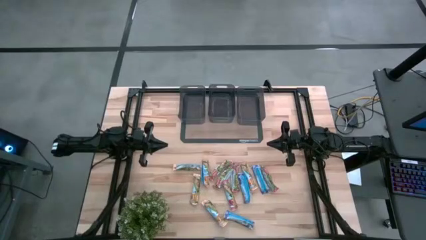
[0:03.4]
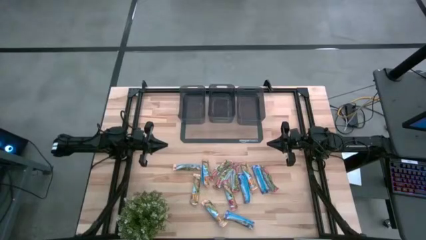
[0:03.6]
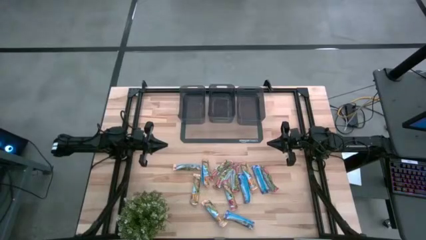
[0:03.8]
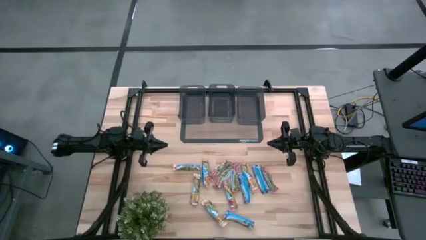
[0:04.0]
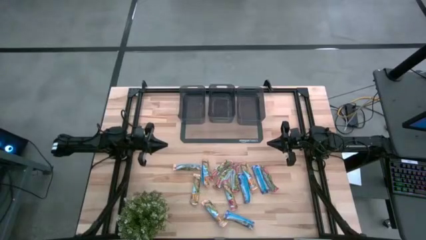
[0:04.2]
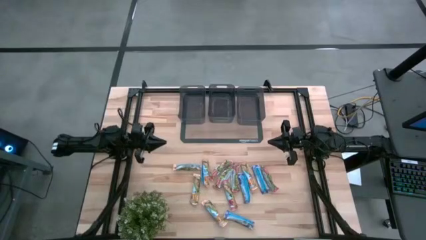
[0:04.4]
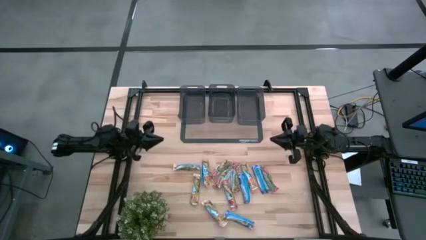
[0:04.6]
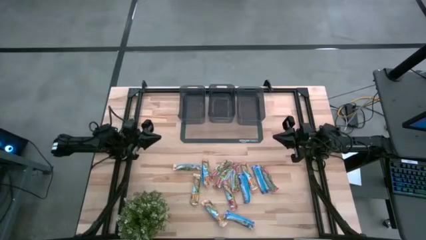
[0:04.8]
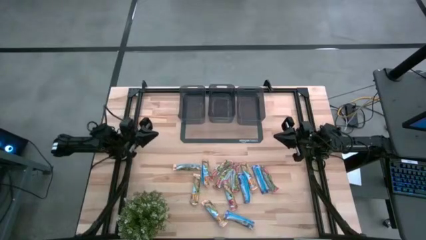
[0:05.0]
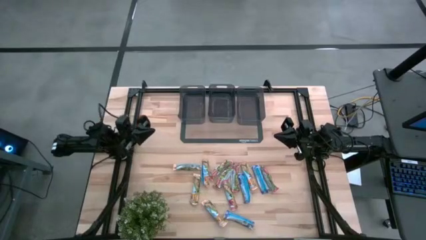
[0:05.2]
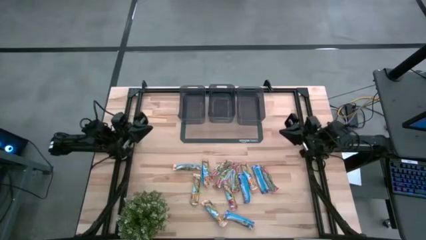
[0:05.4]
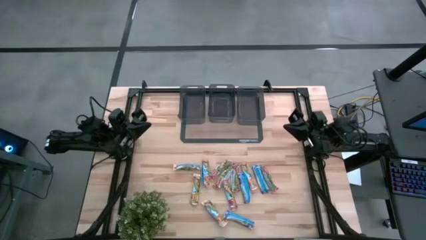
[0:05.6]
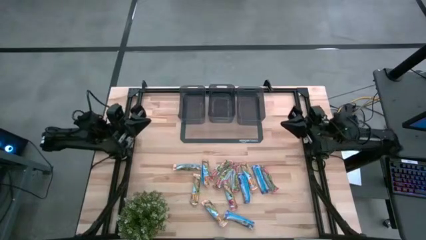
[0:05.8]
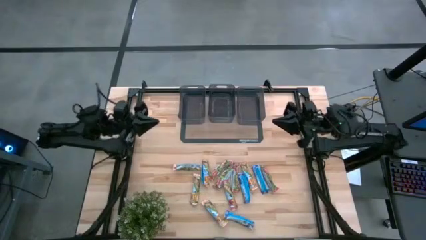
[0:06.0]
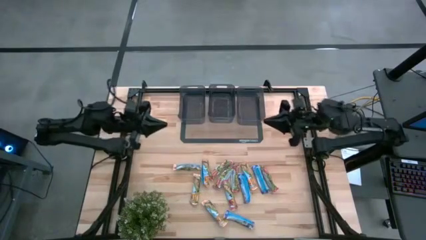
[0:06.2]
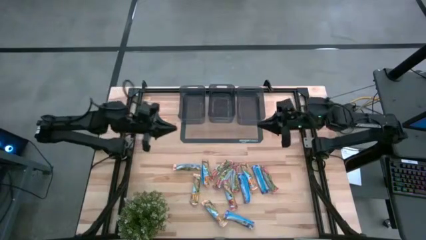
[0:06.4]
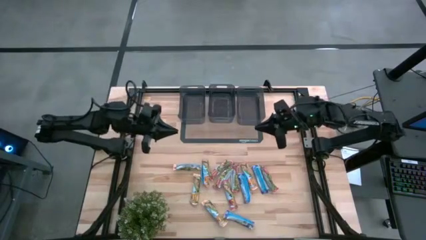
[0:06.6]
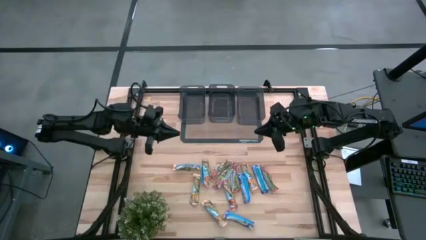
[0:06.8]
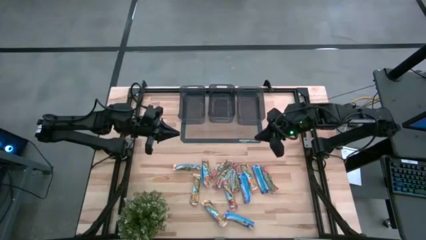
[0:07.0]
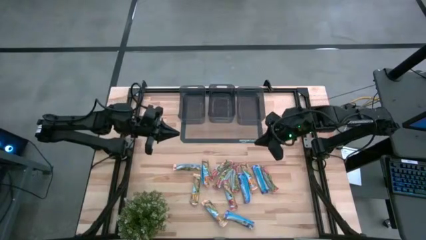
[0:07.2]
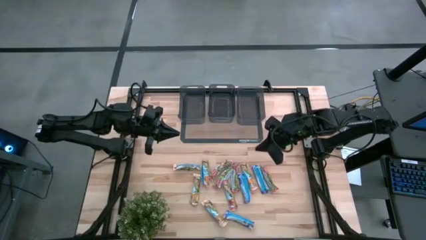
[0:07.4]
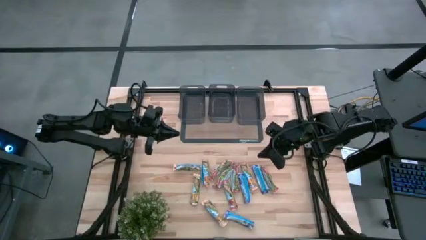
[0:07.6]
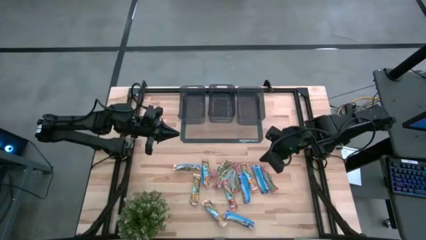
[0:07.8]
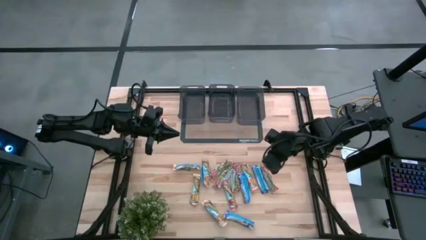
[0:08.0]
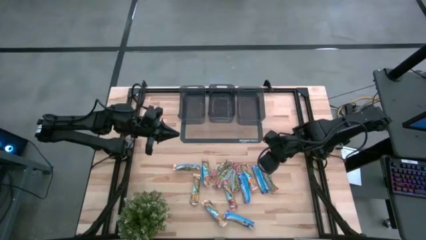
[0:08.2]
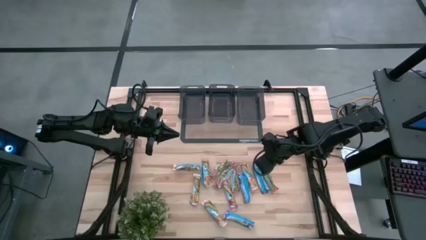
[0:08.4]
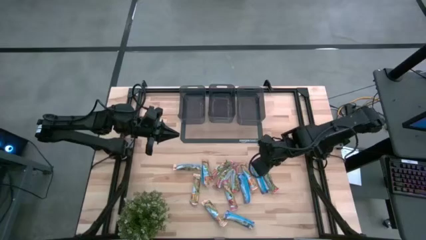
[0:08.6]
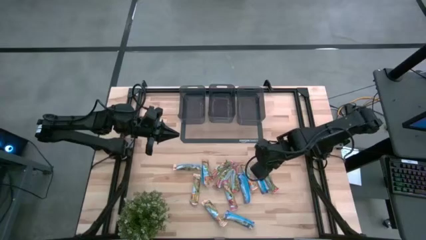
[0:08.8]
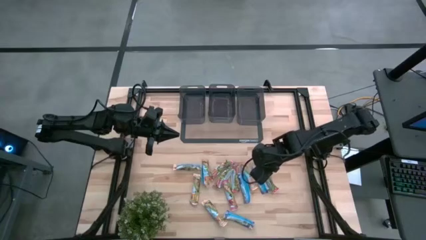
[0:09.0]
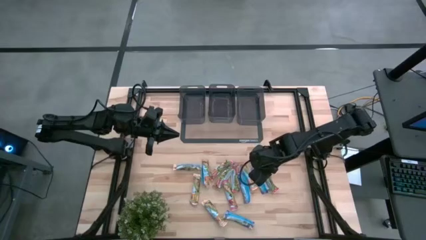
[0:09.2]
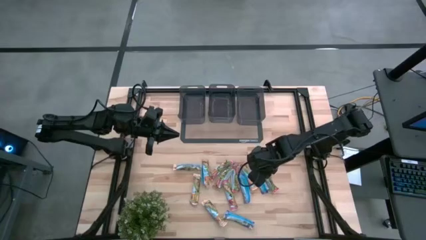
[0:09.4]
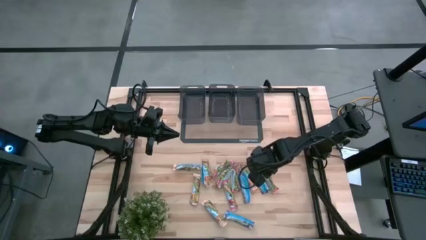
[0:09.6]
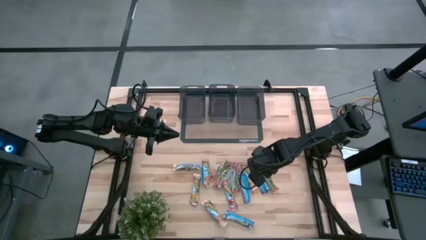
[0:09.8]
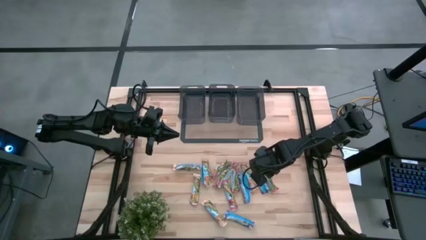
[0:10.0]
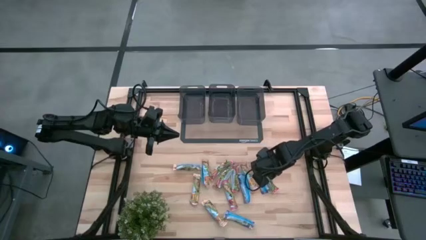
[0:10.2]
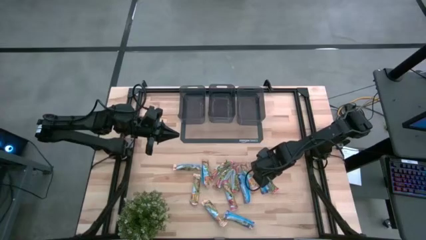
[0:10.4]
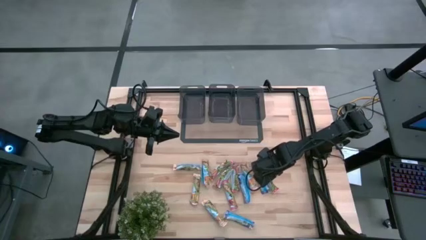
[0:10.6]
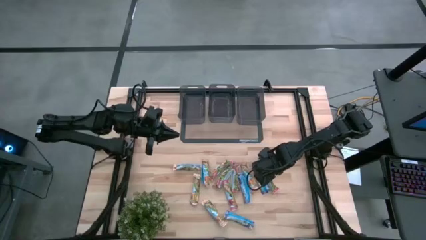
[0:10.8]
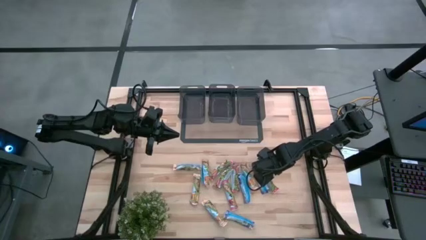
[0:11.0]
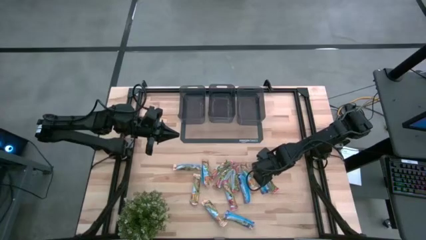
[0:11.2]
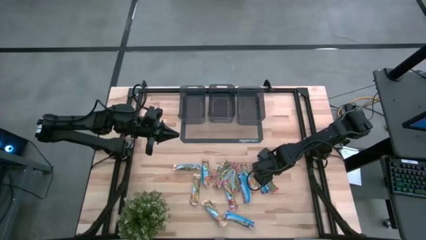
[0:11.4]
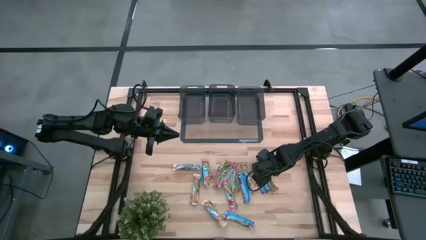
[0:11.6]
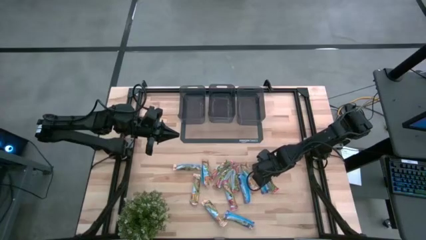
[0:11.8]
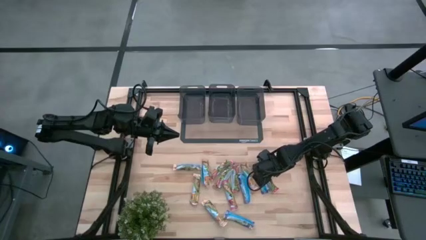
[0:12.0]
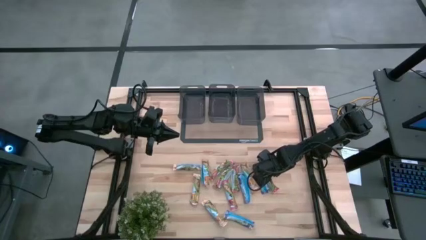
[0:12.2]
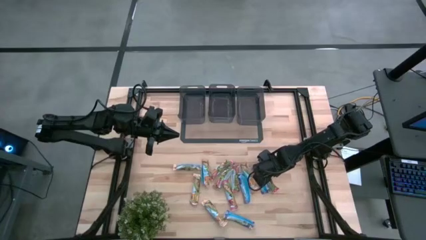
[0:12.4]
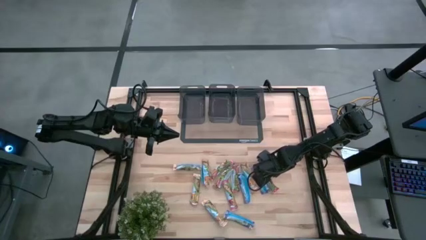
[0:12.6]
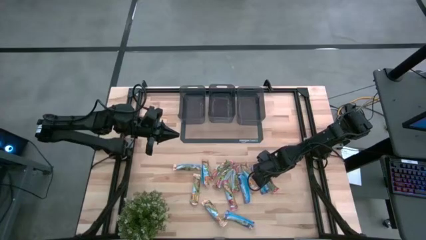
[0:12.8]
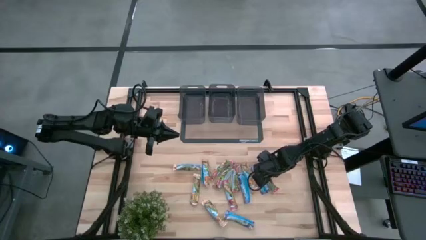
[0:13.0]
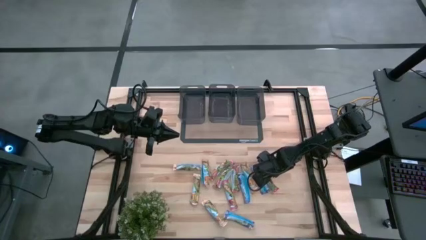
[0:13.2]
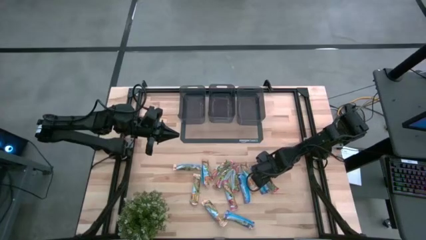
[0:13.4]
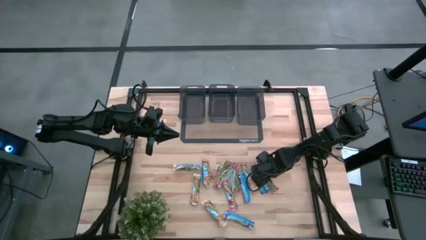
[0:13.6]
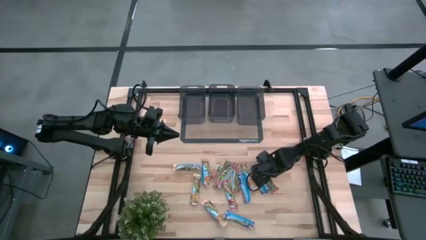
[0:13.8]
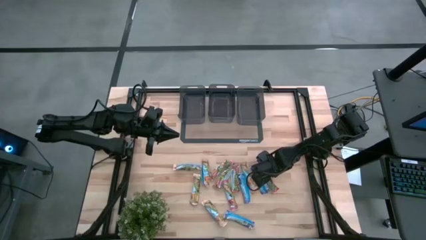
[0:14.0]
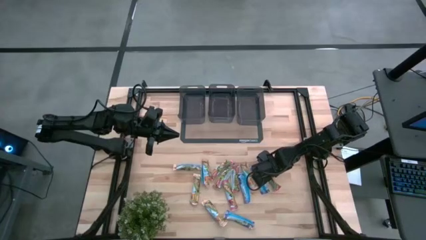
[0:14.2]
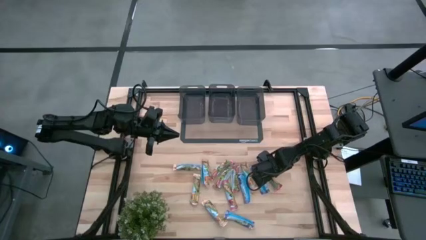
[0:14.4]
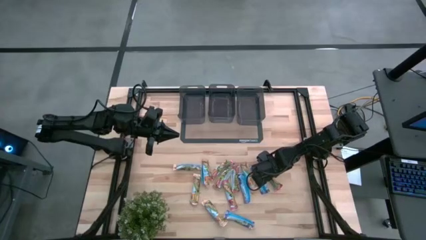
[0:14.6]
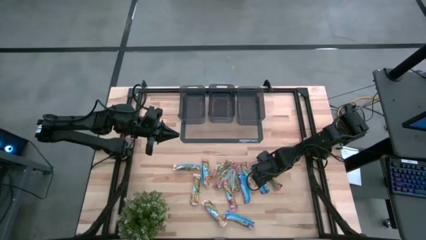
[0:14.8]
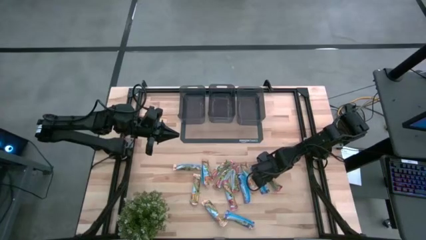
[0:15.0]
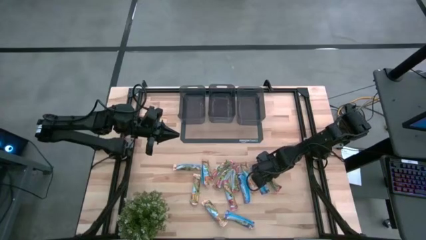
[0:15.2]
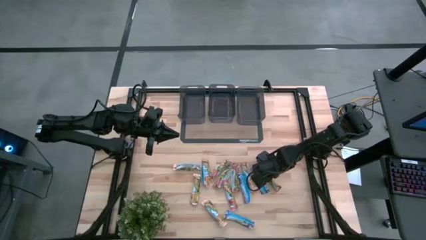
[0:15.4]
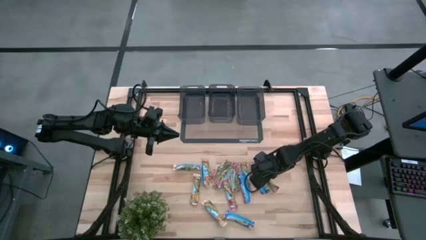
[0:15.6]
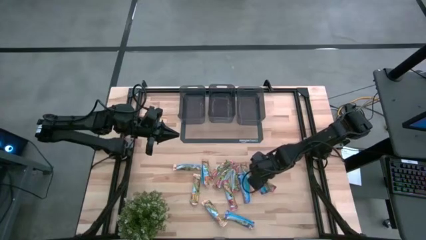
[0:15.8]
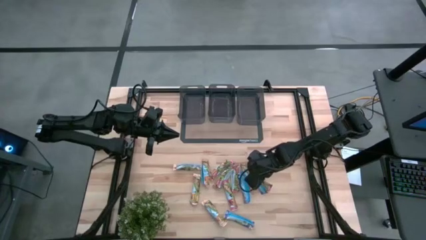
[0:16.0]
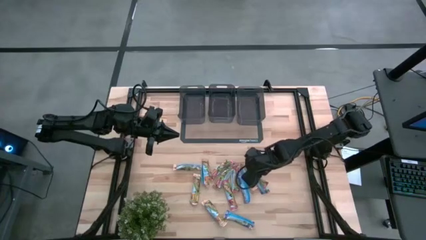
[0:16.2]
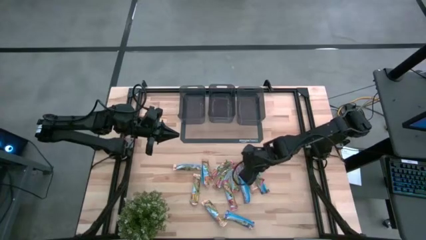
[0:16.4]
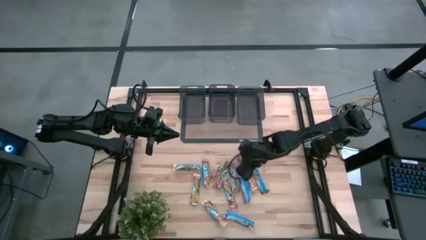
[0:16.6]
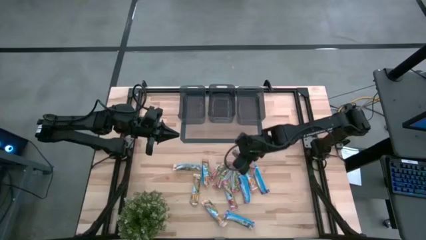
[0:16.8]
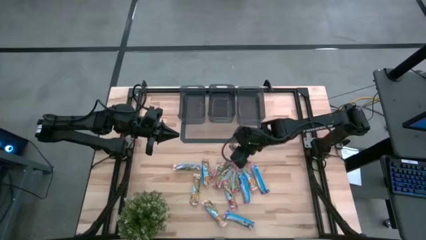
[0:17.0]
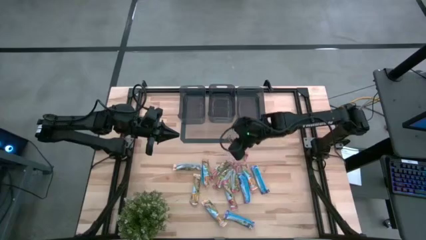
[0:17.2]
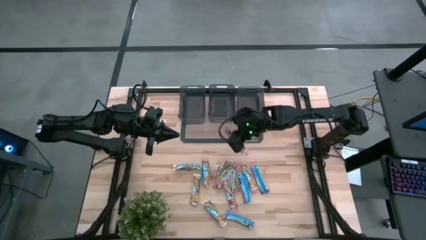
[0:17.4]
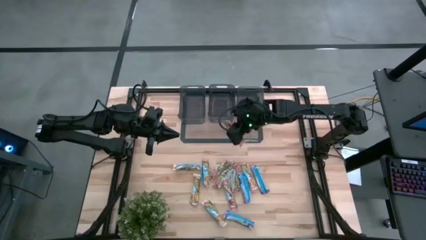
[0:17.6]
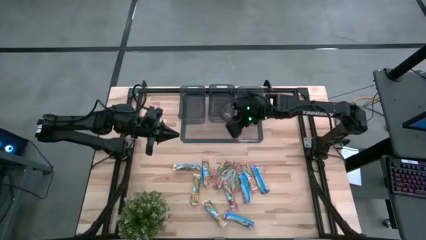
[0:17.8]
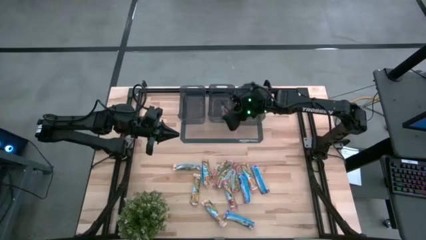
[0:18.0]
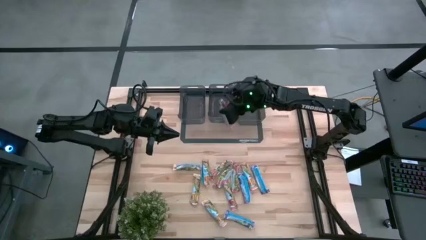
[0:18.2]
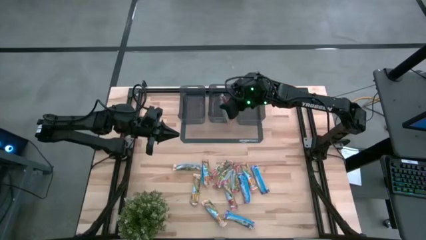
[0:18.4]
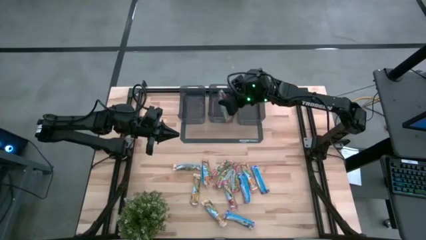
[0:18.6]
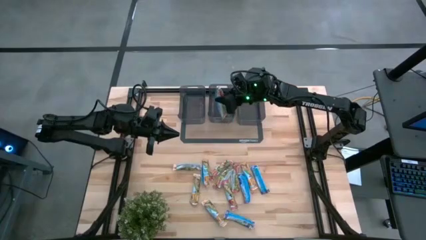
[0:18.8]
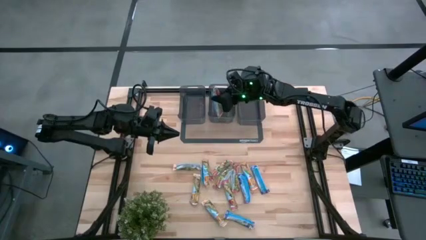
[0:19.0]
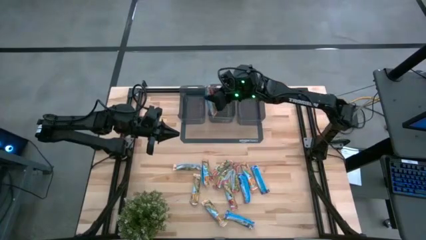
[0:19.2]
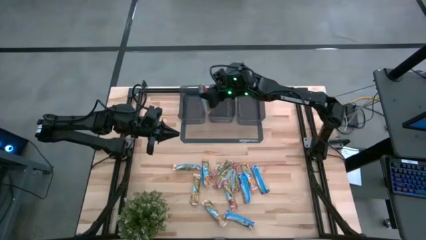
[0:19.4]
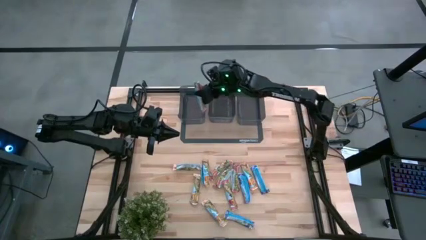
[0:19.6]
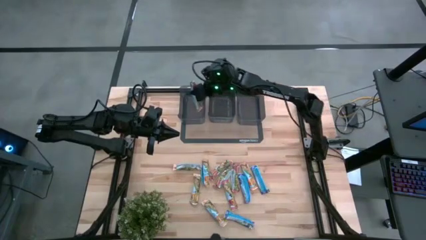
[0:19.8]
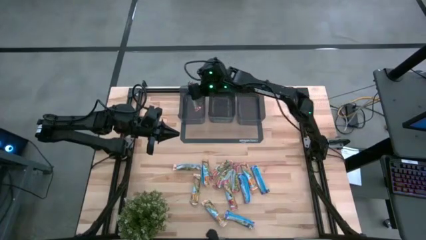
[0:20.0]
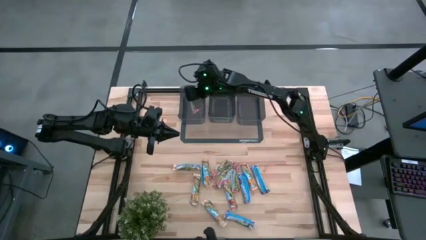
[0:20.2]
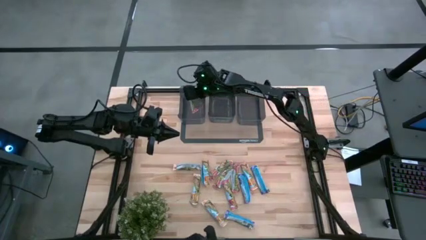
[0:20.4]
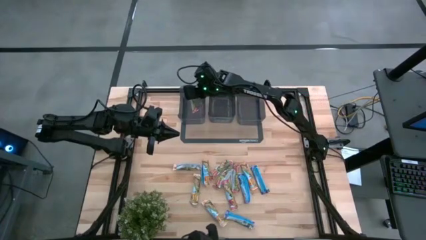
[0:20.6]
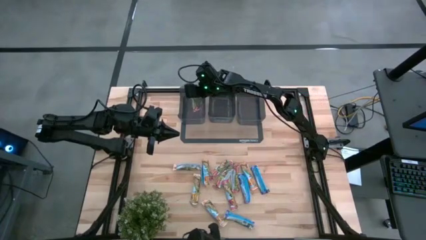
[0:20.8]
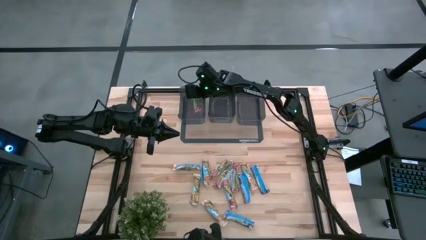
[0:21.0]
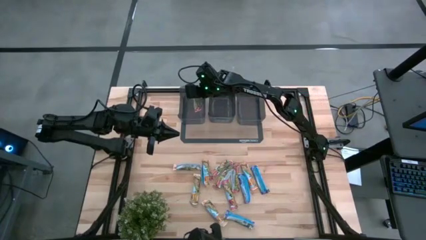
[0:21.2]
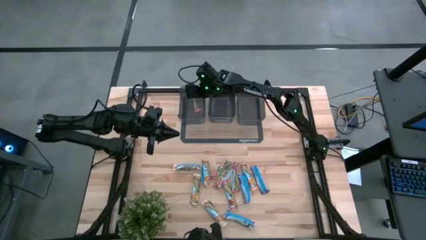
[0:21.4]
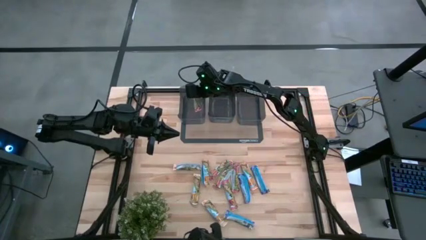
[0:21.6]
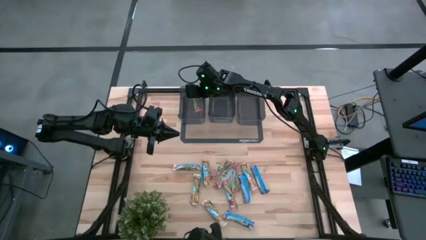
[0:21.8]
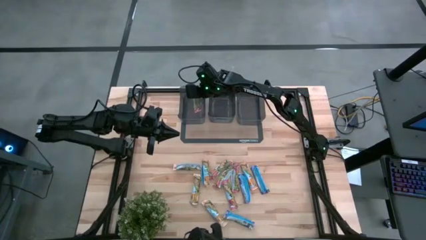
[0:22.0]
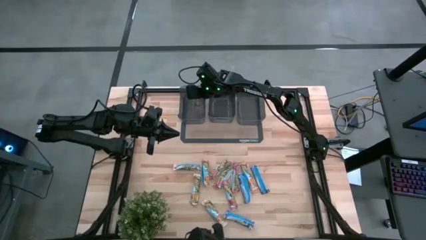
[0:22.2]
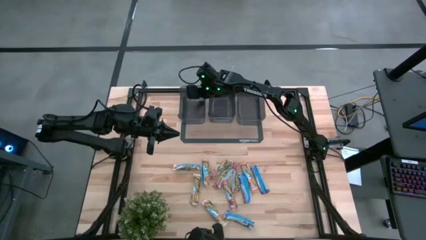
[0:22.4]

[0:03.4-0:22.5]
Task: Pick and place Granola Bars by type
Put the red granola bar into the left black bin
